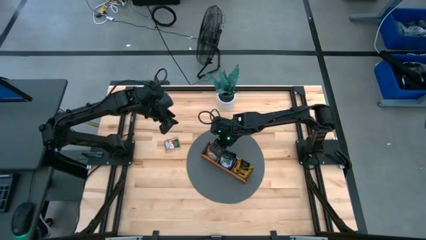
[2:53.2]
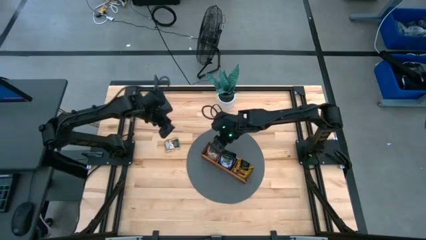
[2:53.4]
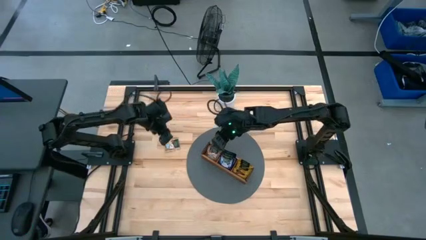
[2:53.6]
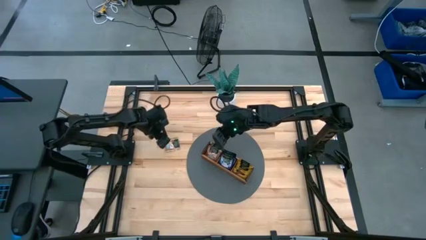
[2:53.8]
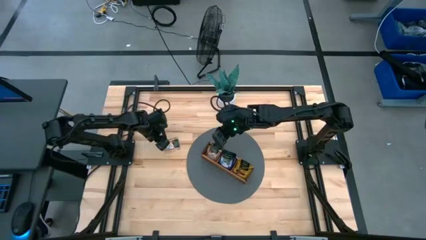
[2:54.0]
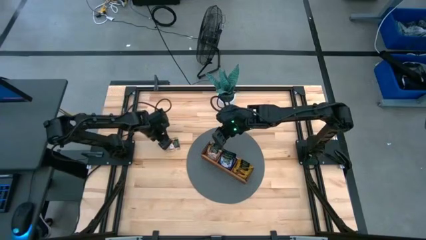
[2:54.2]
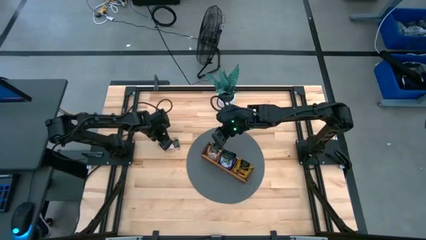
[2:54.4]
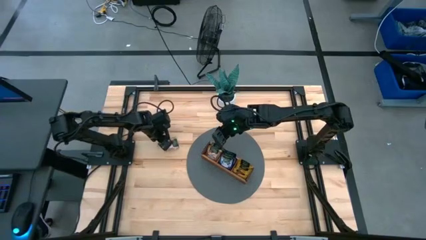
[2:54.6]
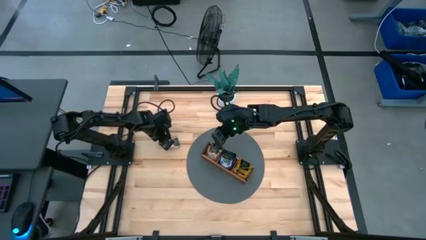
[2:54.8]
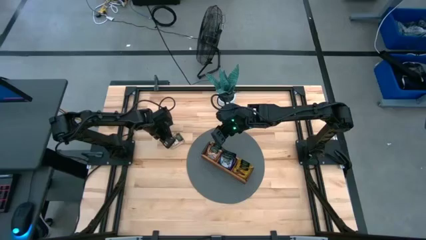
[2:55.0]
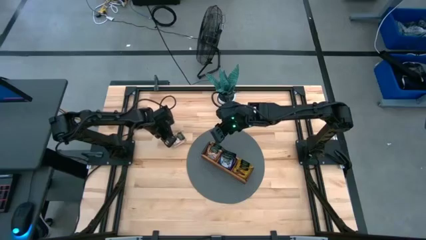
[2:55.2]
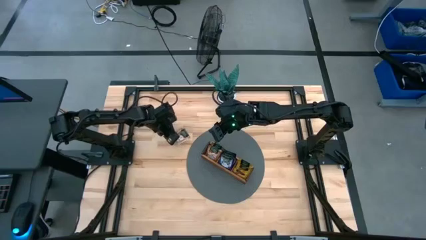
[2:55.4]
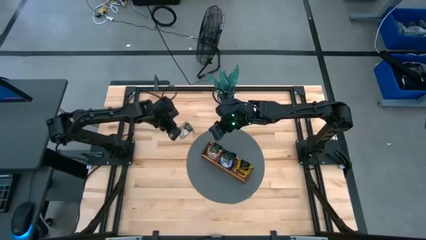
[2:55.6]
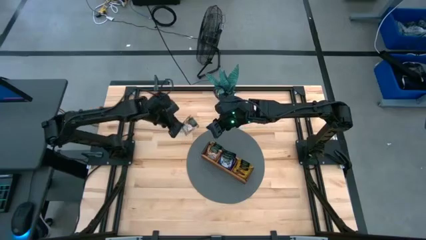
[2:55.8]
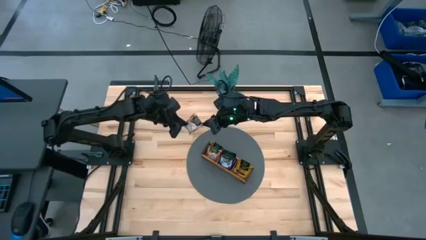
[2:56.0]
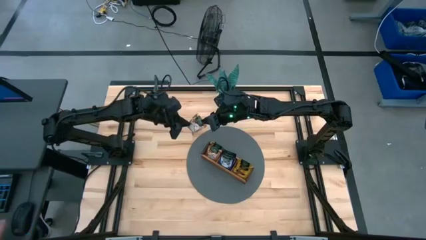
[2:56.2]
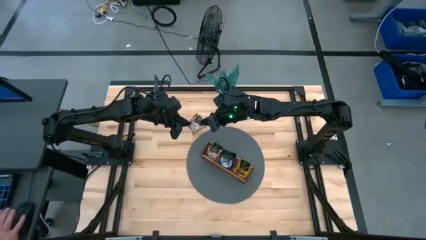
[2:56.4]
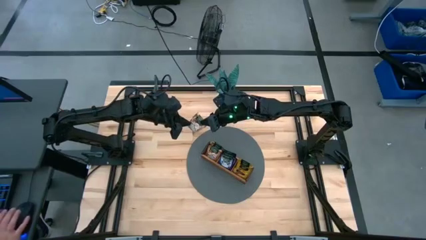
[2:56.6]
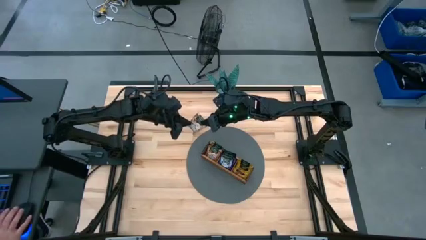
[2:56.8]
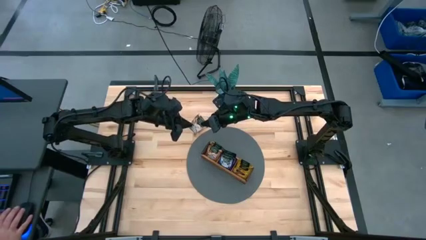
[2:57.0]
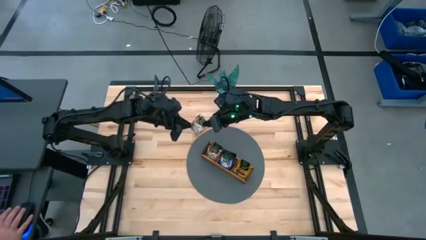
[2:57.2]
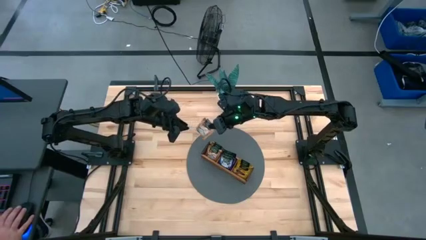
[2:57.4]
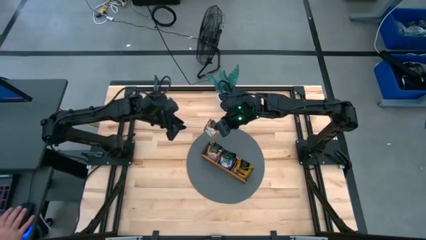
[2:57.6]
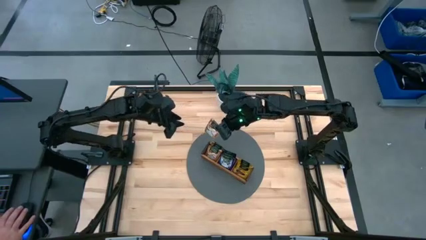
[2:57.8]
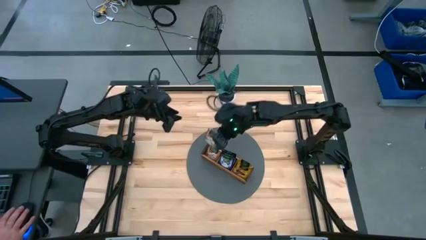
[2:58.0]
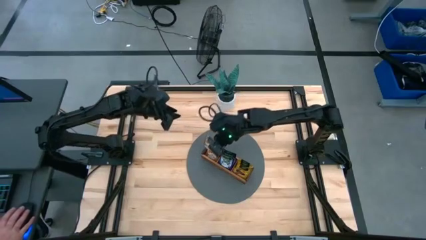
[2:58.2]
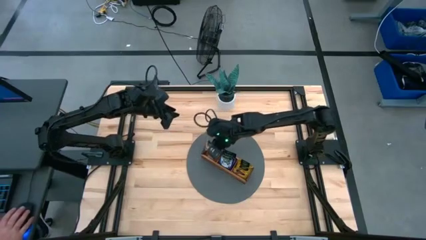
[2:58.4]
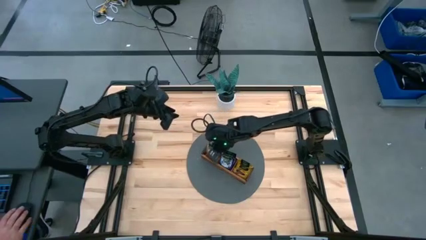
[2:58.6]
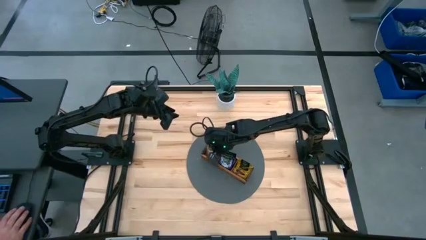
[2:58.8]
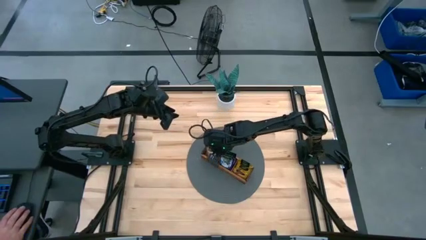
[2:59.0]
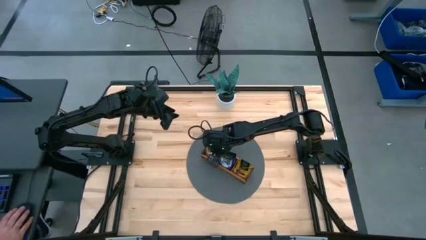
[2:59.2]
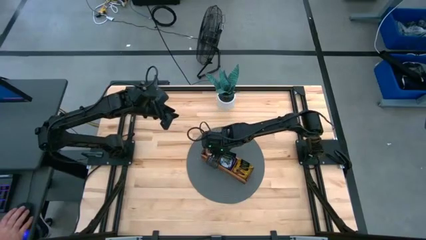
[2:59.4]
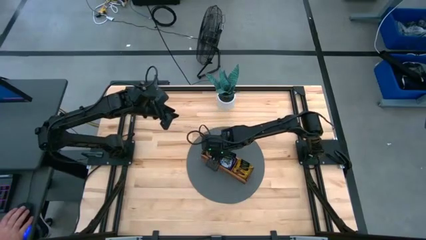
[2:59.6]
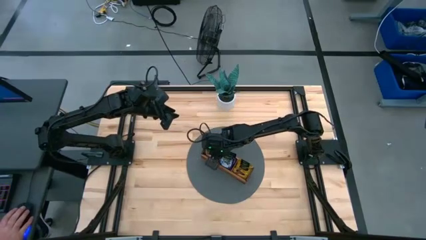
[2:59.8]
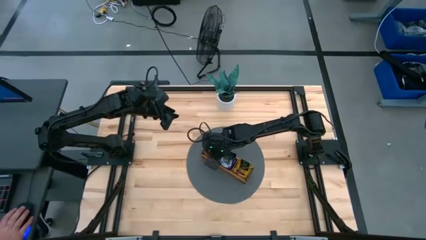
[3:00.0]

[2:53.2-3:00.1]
Task: Pick & Place Tea
Put the brown tea bag into the left section of the wooden organizer

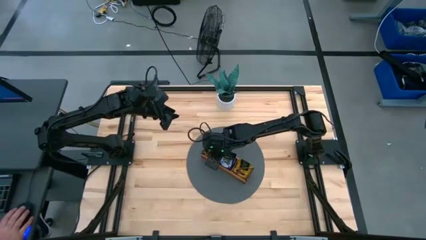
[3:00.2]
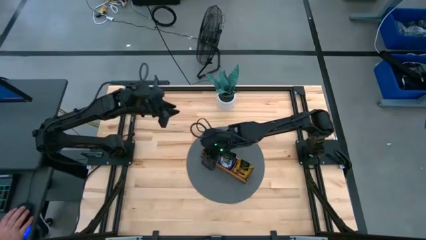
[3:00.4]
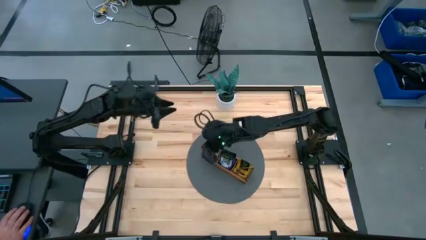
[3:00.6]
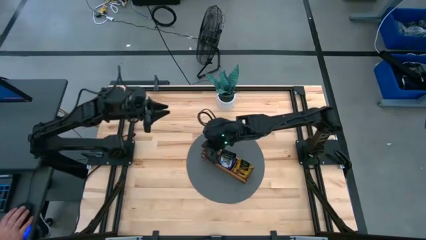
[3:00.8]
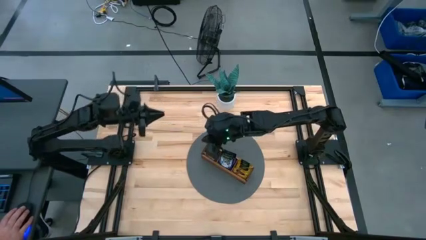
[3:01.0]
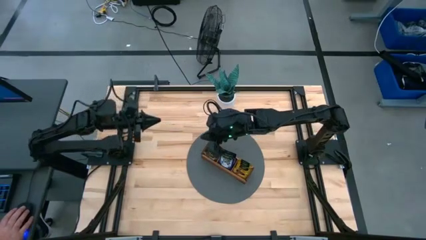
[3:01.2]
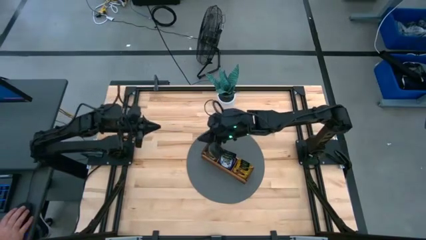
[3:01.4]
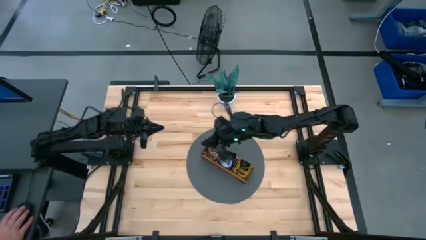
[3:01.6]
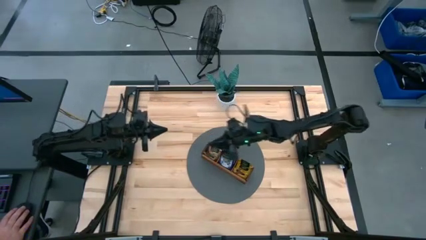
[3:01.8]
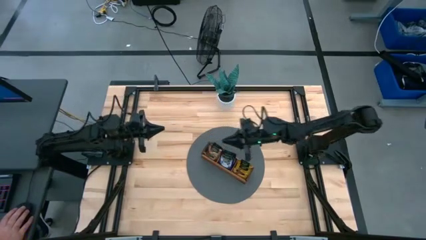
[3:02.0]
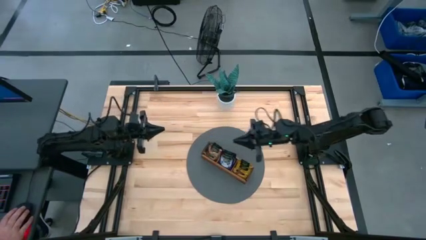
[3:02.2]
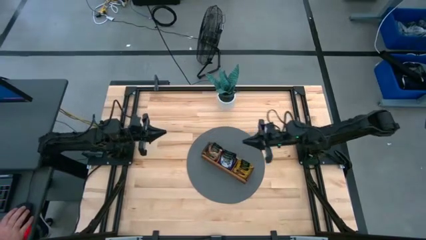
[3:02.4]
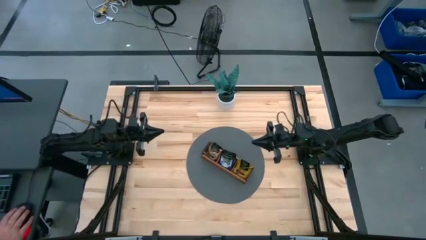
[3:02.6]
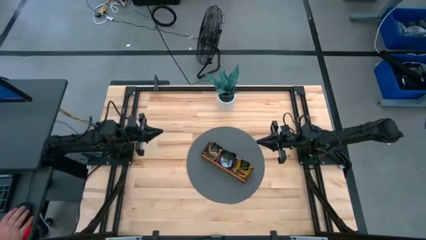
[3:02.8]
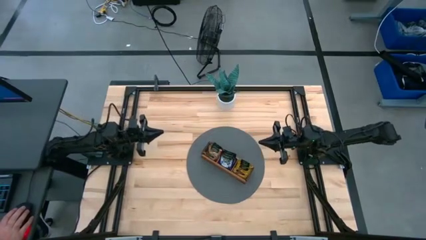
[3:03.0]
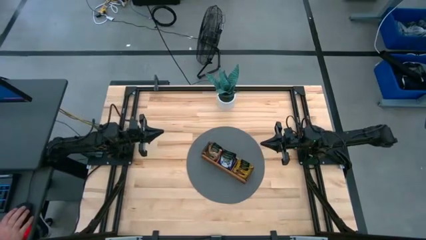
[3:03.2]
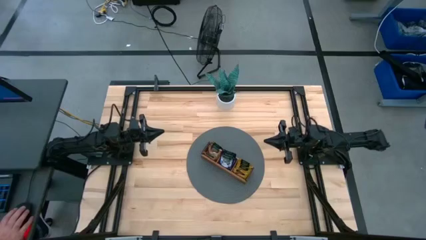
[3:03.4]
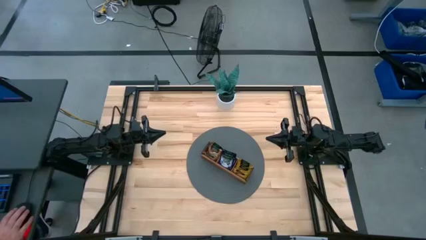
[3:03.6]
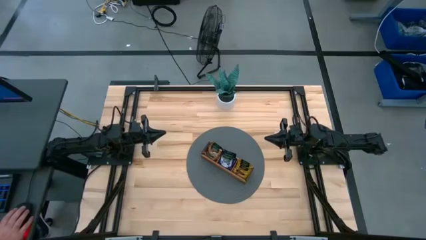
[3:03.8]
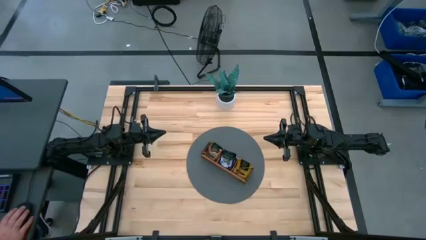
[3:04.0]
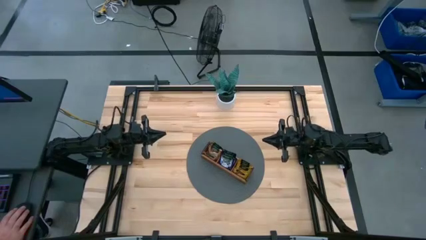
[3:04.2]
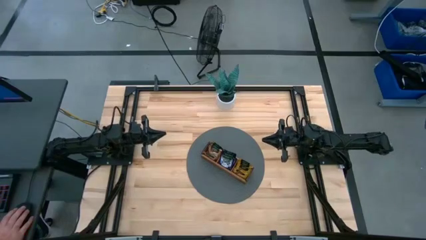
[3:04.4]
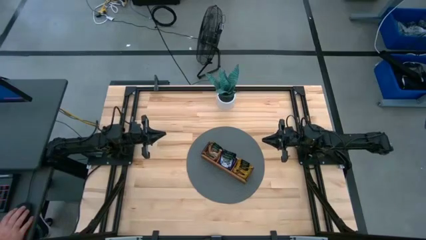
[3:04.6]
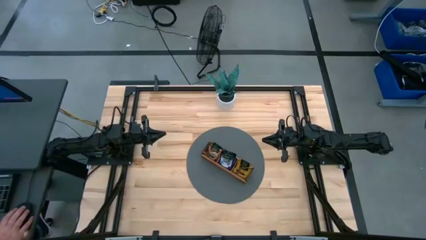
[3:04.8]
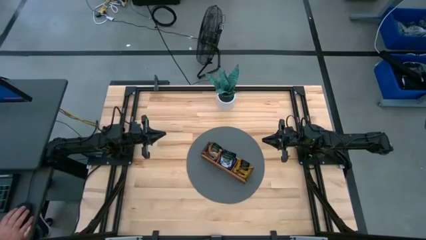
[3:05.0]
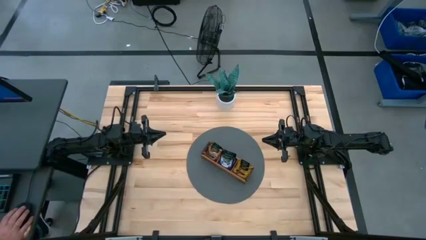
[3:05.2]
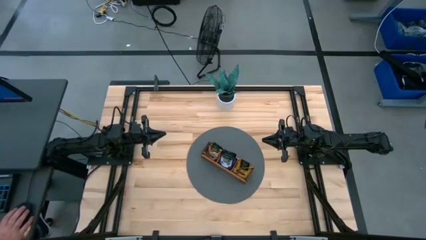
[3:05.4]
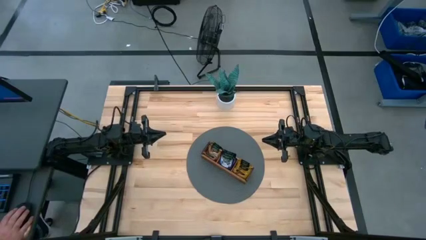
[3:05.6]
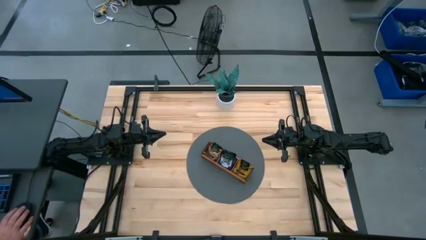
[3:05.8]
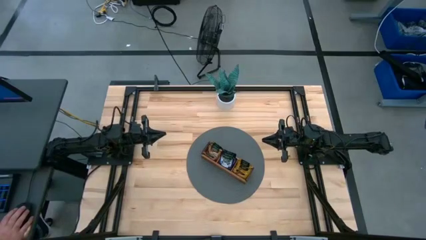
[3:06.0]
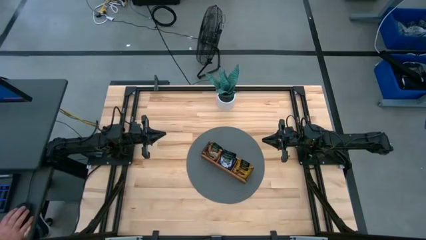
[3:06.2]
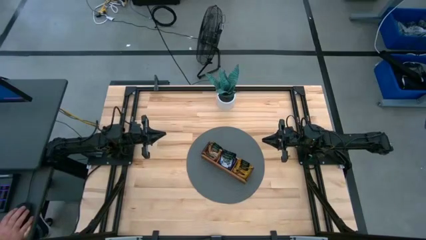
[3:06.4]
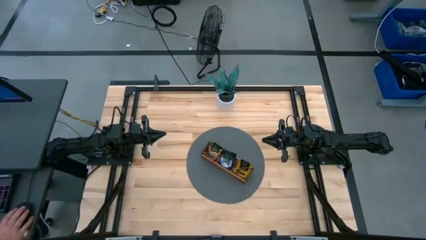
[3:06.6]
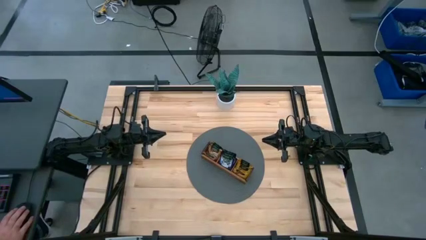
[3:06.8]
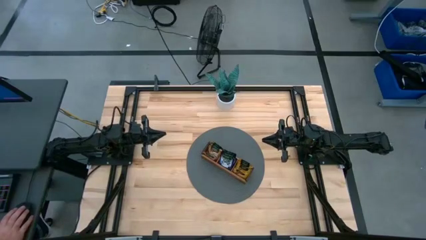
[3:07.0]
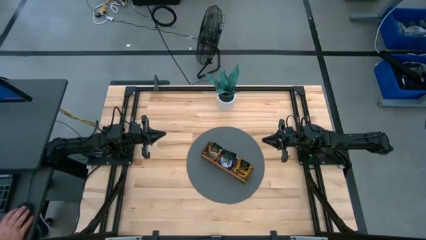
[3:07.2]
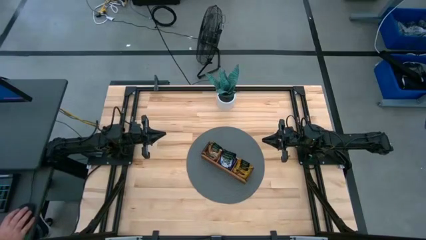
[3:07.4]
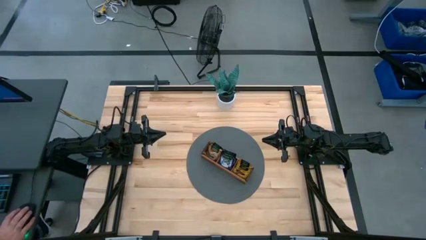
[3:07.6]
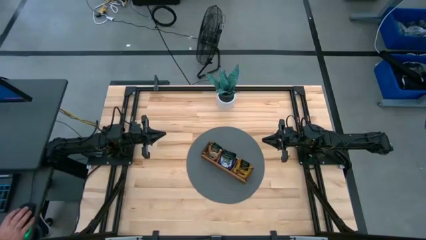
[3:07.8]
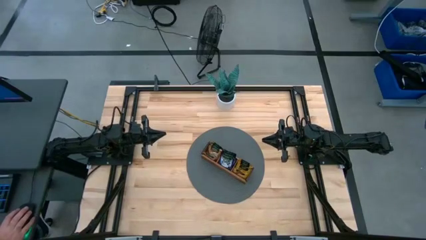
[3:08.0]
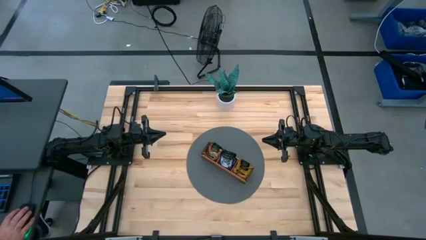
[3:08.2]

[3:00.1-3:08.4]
Return to home position

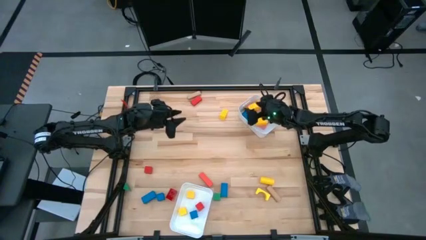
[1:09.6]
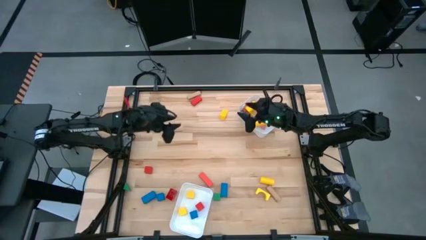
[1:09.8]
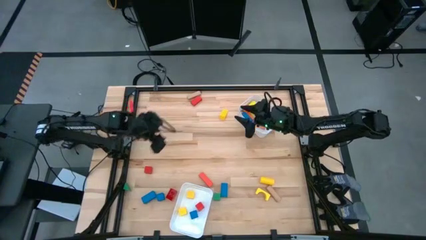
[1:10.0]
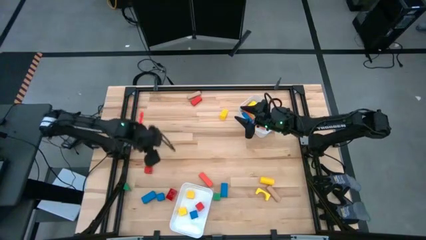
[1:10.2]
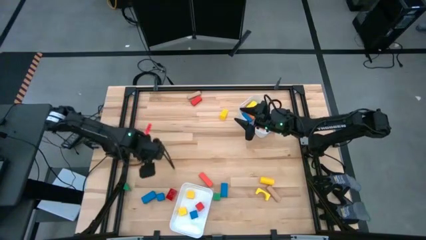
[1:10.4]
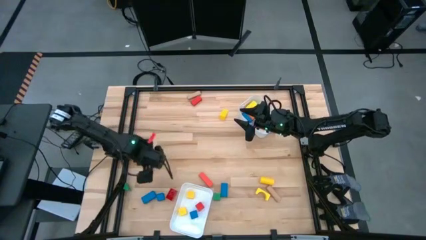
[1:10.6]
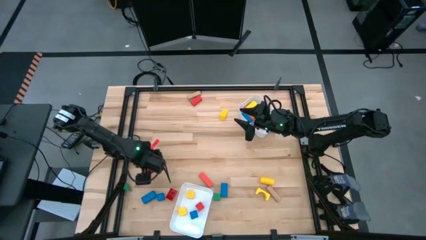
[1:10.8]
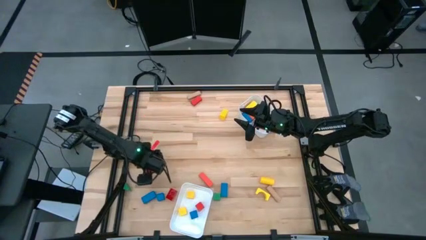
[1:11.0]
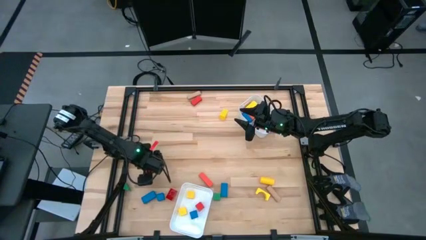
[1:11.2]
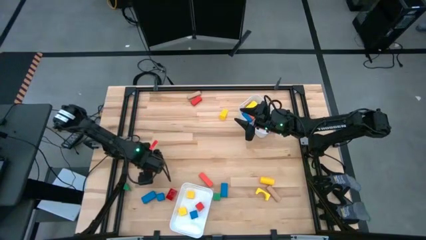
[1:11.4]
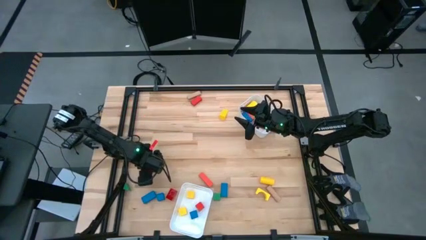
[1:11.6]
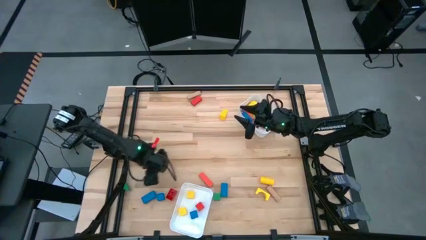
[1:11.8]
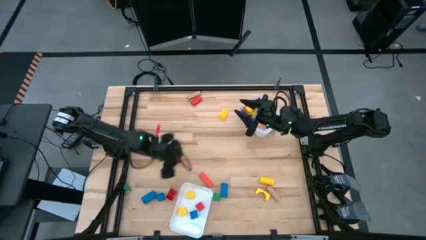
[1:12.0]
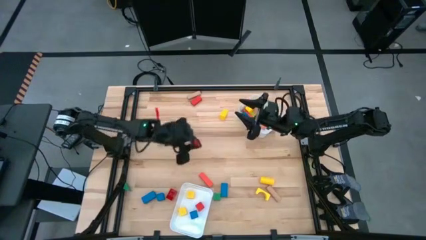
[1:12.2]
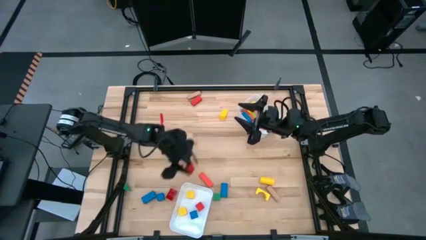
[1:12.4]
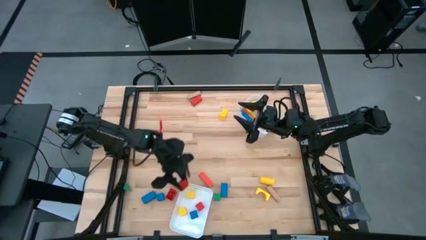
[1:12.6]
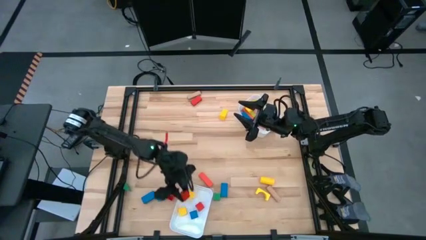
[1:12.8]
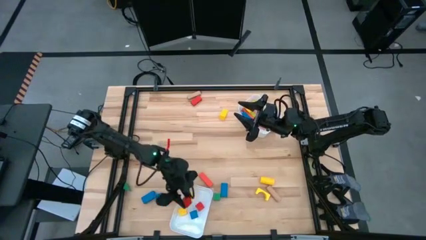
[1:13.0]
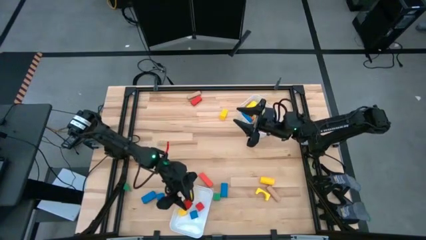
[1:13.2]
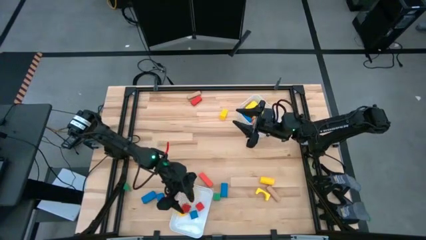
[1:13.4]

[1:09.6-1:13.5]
Task: Sort blocks by size
Put the red square block into the bottom white bin
